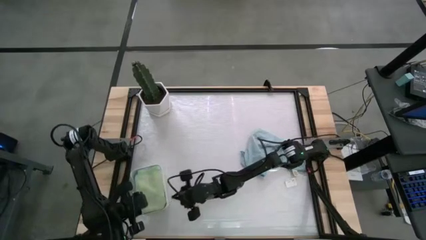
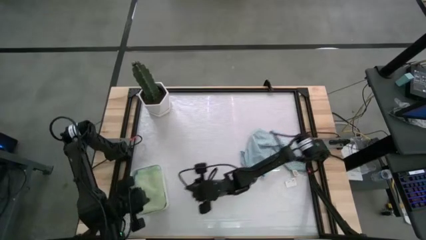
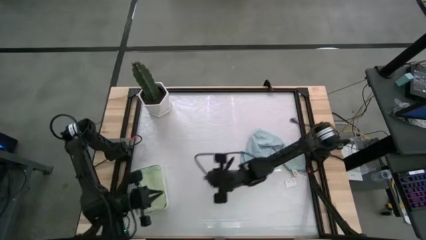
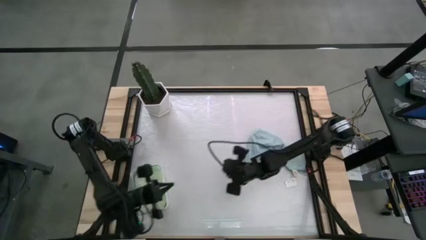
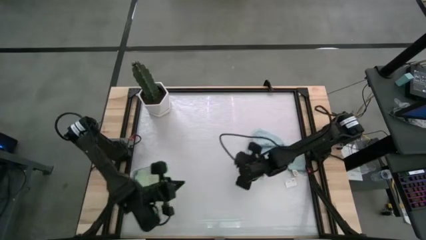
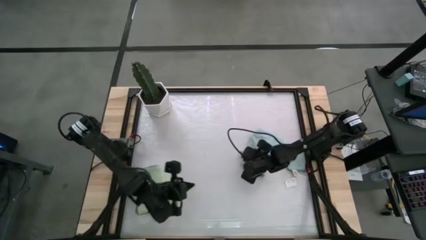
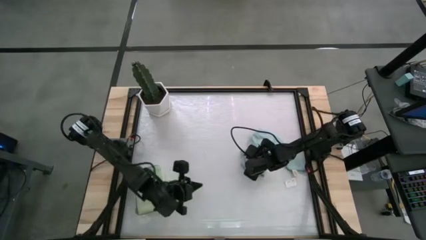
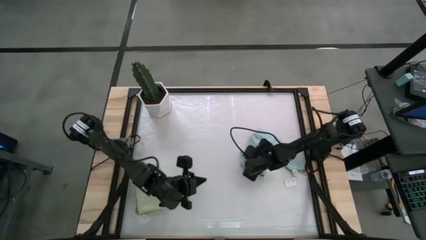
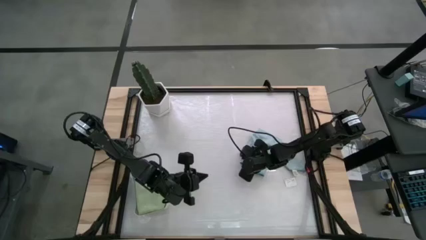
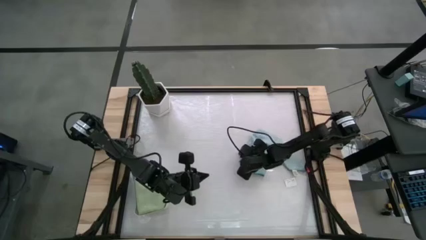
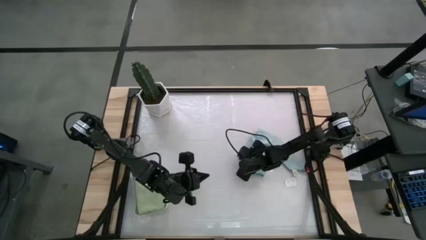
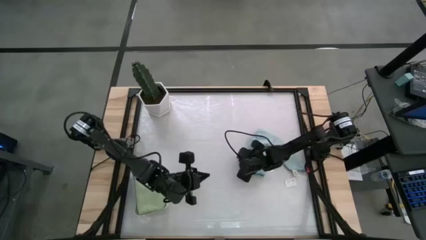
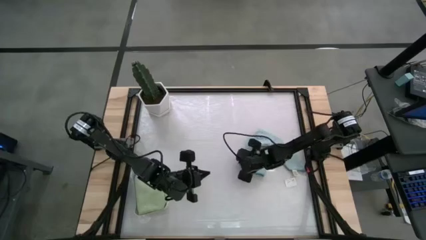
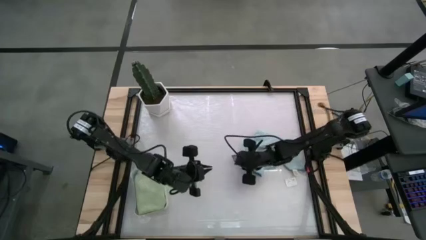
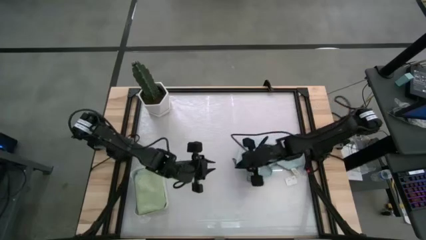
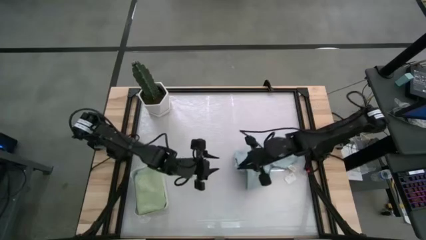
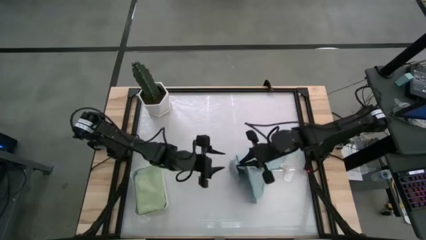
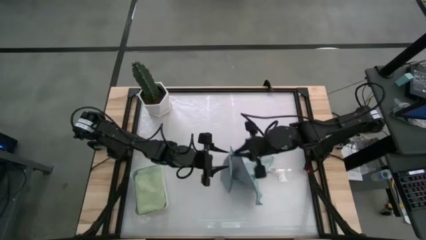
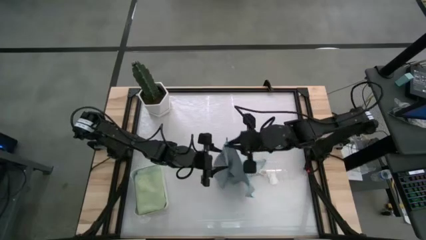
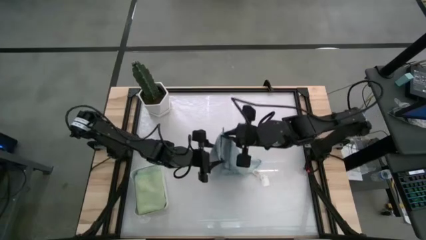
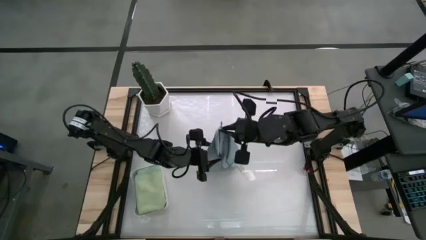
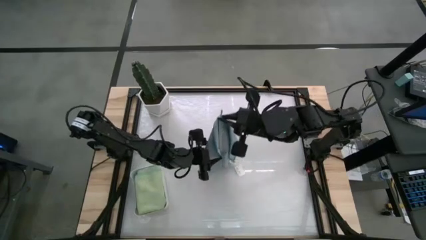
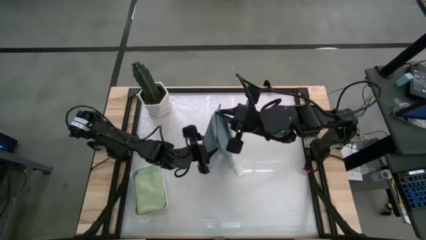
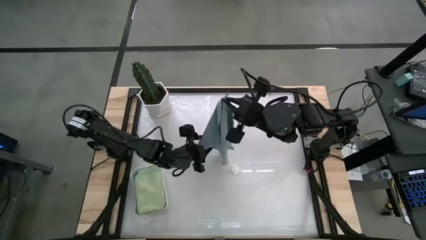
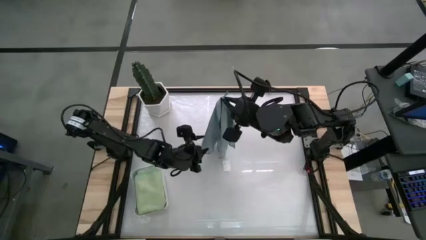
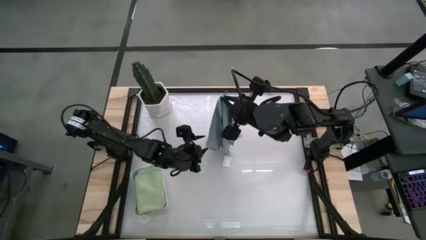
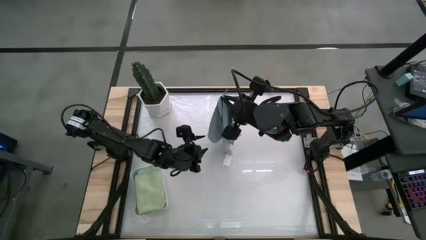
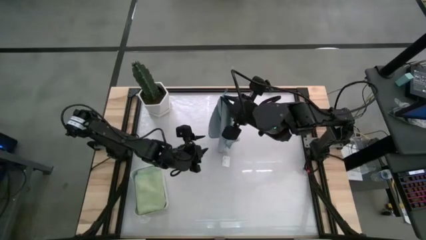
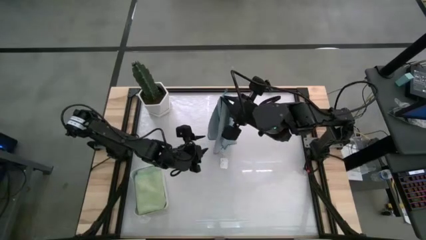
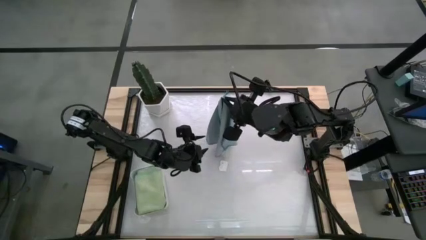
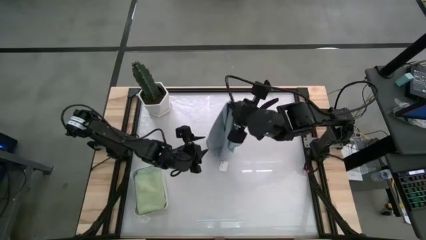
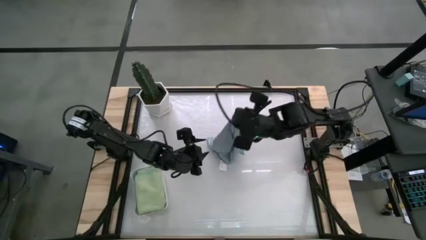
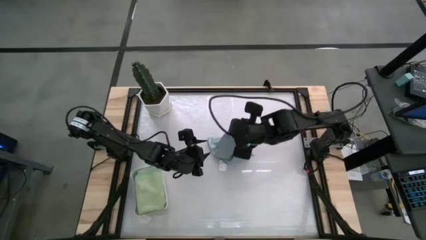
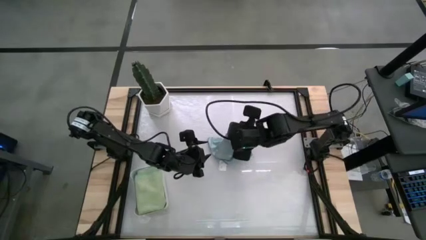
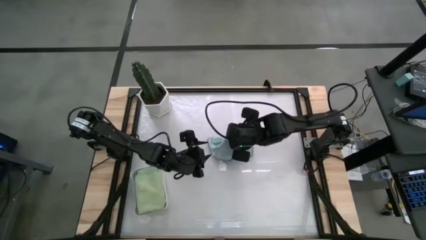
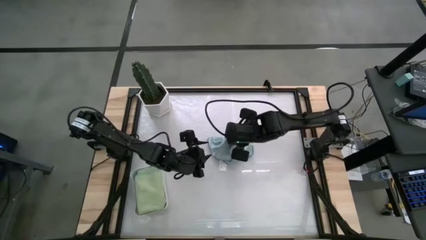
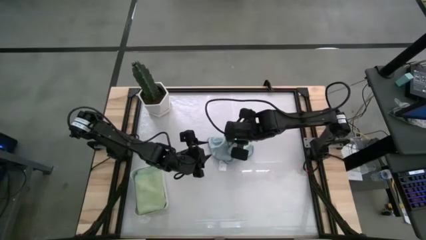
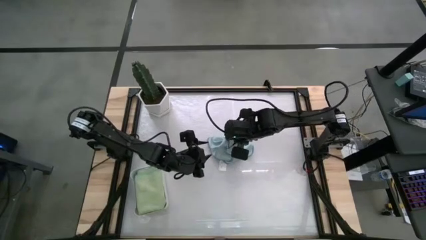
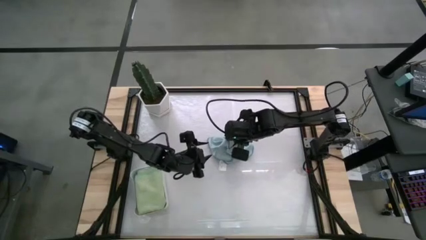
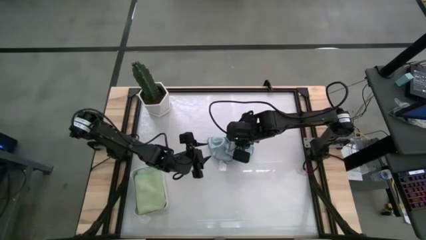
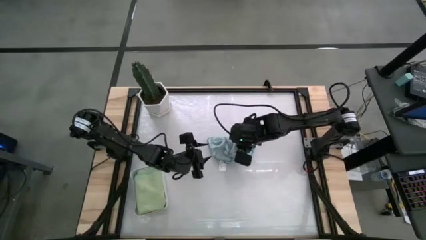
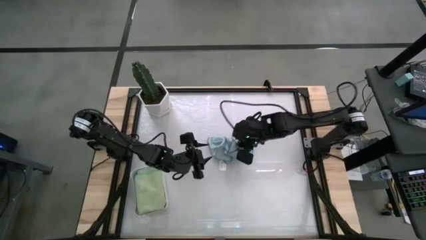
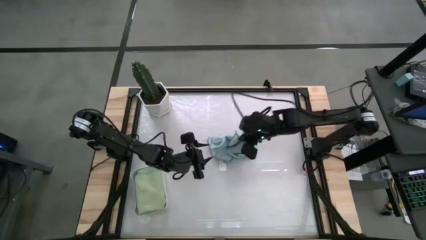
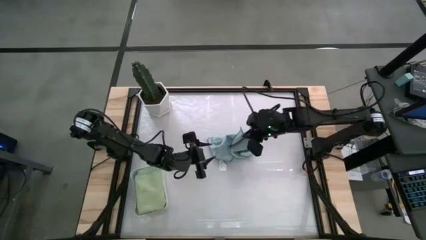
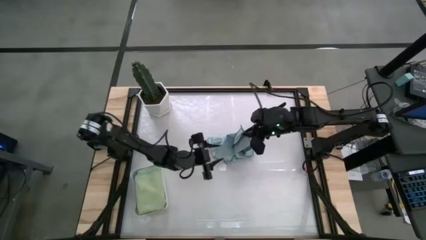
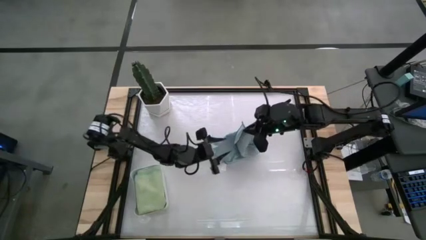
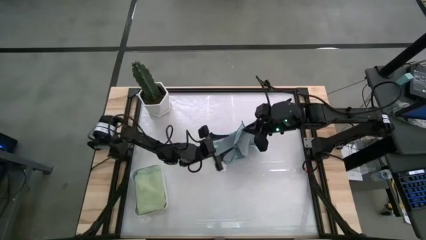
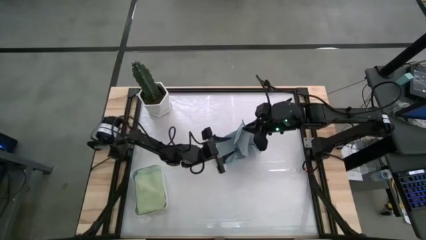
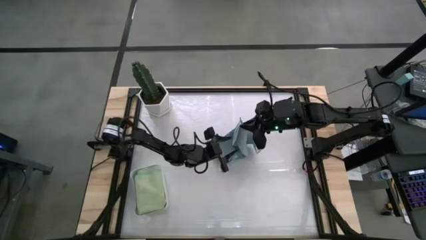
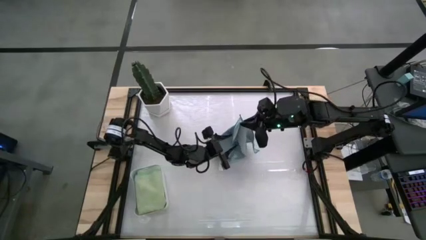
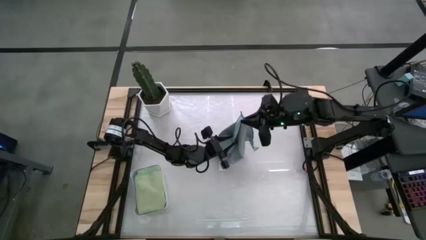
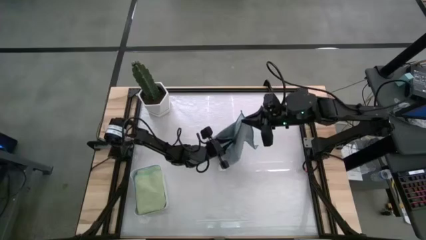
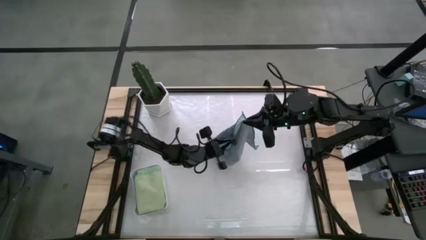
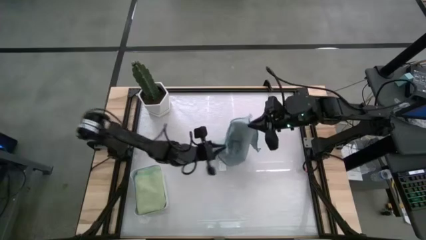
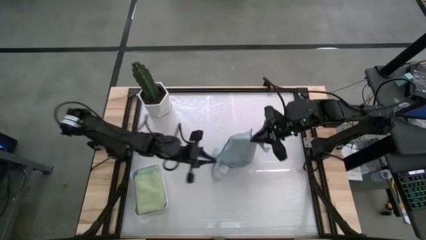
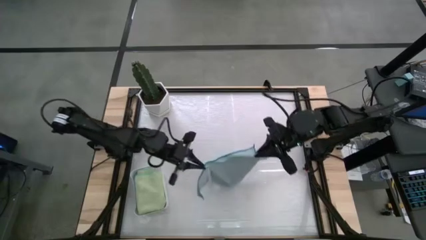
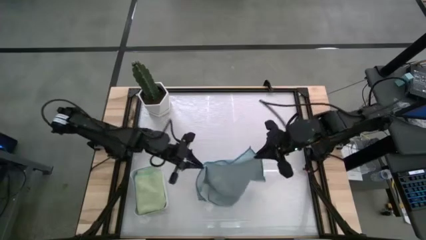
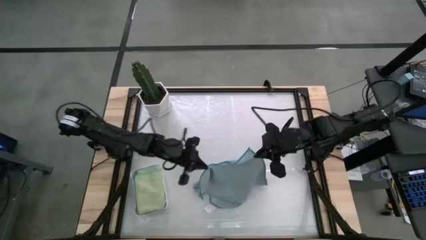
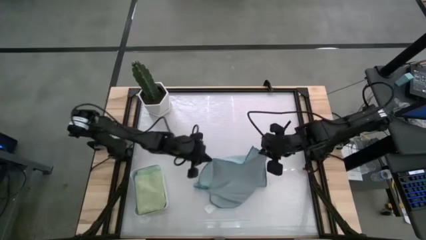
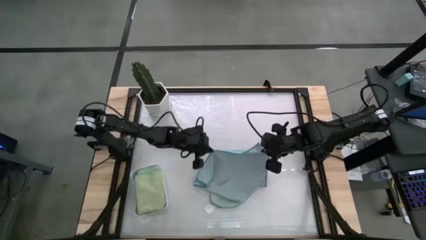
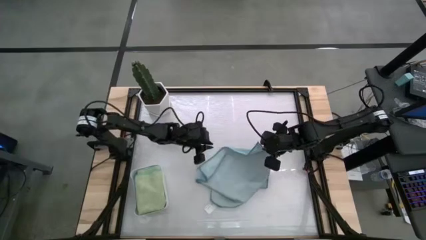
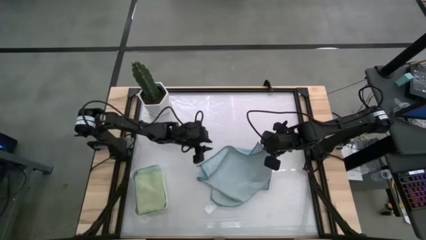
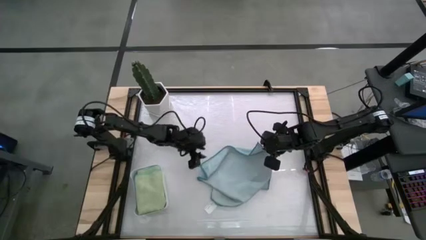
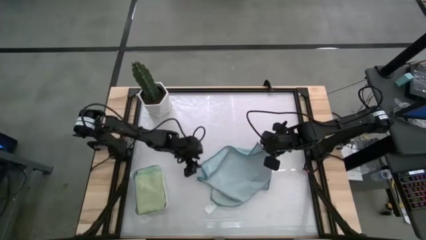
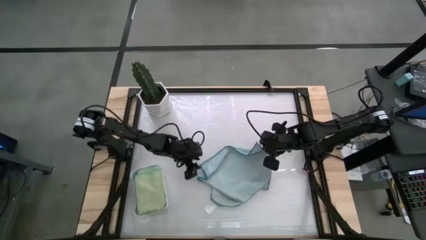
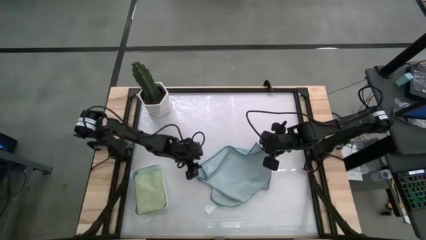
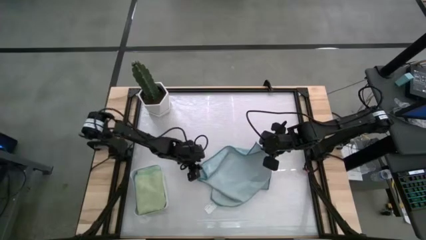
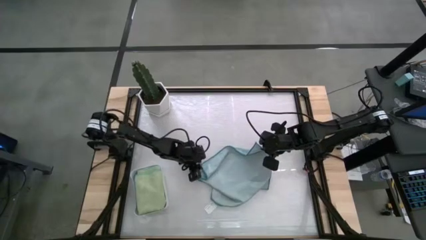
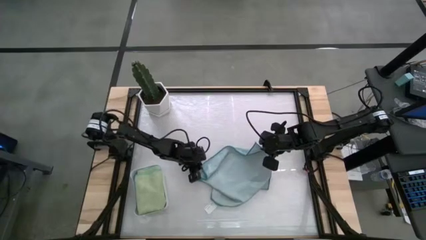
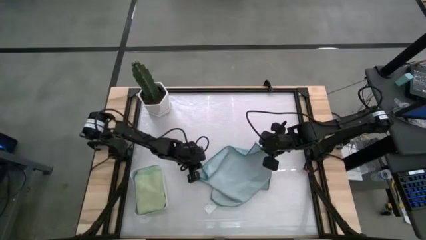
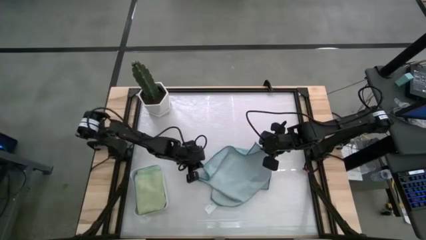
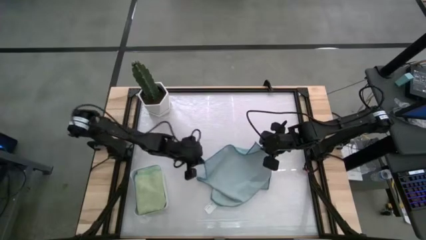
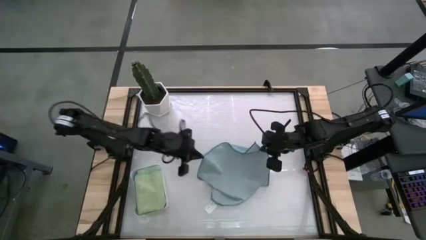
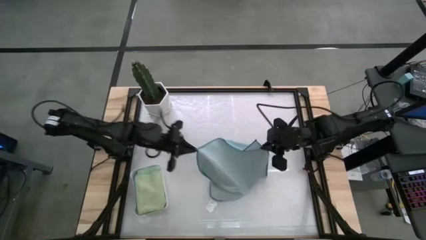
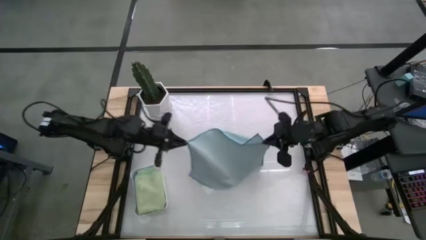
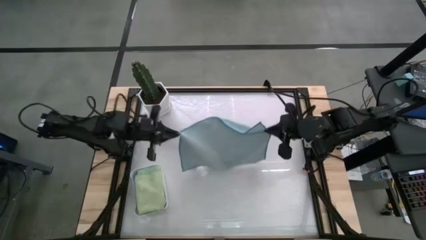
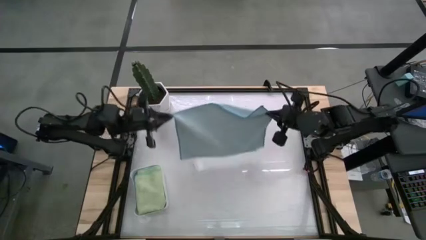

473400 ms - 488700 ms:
Task: Fold microfiber towels
Fold the light blue microfiber towel
